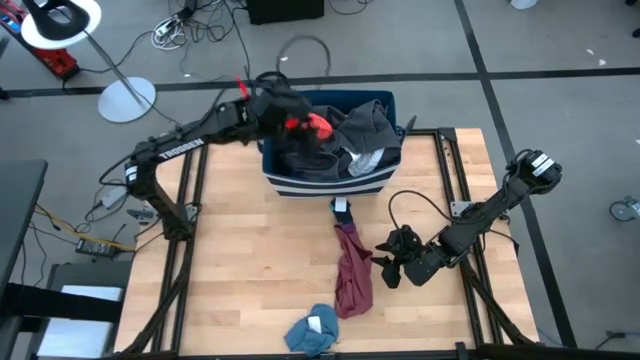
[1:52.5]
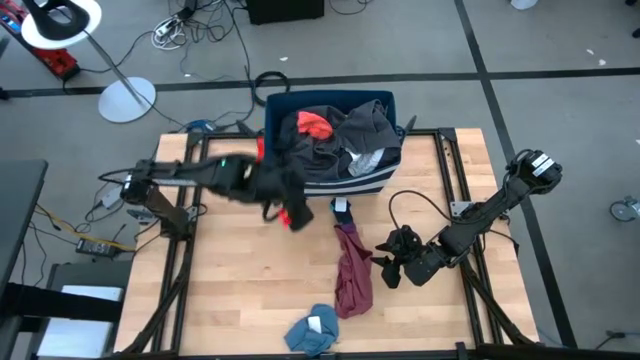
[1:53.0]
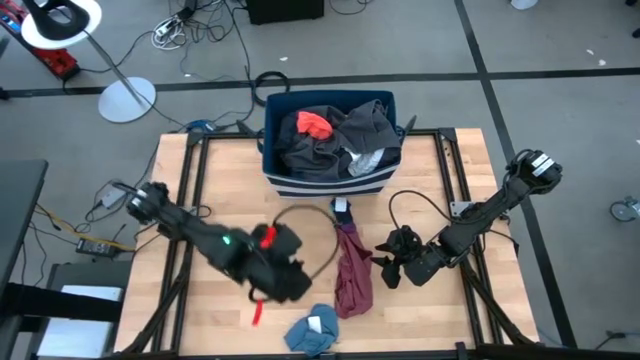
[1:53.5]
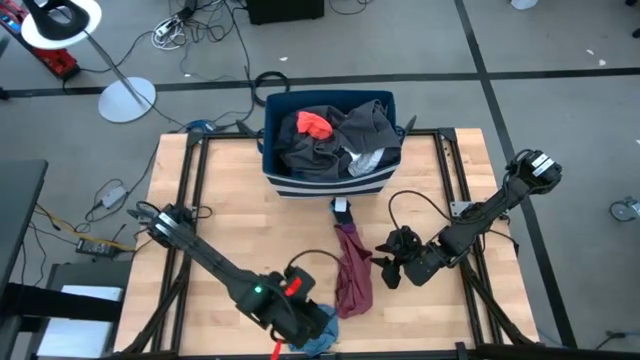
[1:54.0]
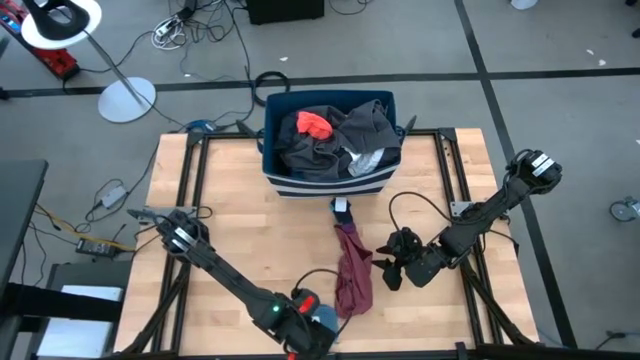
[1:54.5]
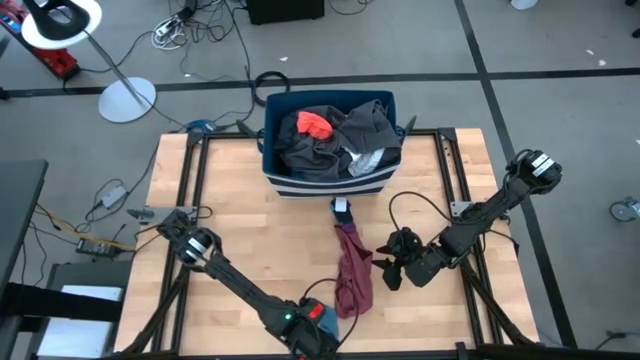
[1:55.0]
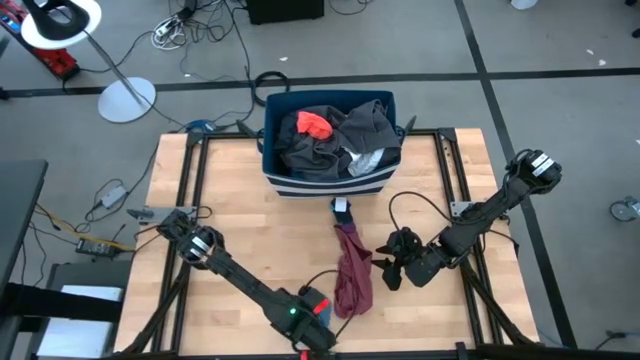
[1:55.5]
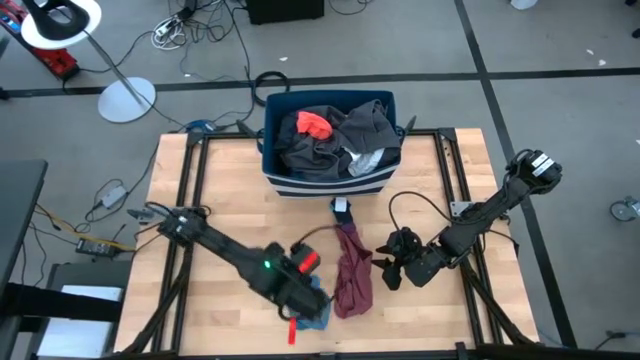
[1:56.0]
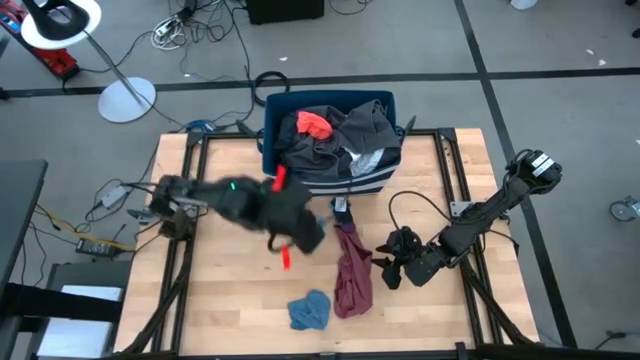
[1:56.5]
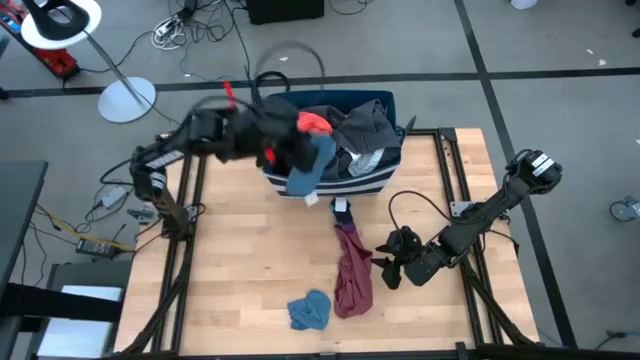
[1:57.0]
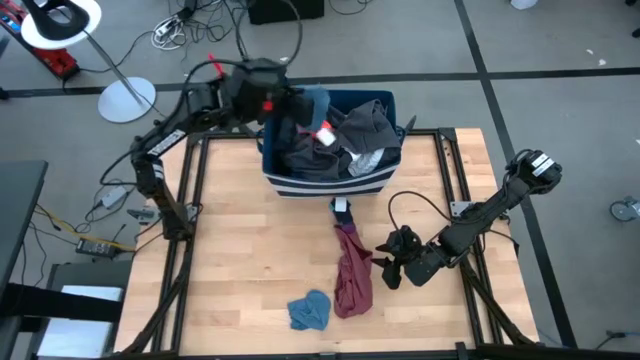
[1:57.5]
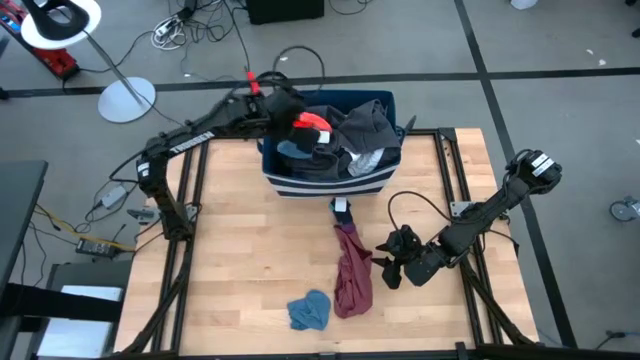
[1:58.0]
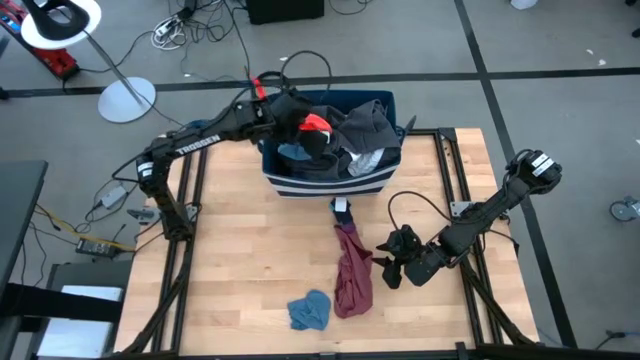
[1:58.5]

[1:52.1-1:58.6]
Task: Sort clothes
Put the blue microfiber cloth into the laundry bin

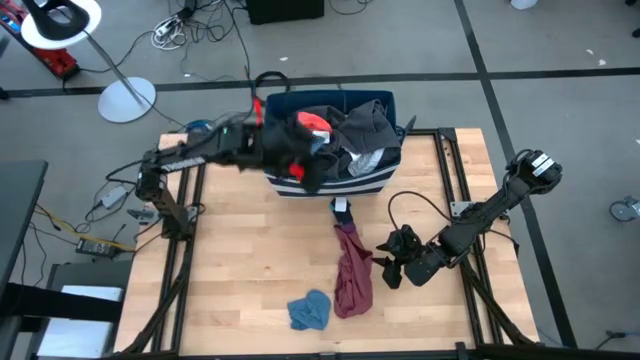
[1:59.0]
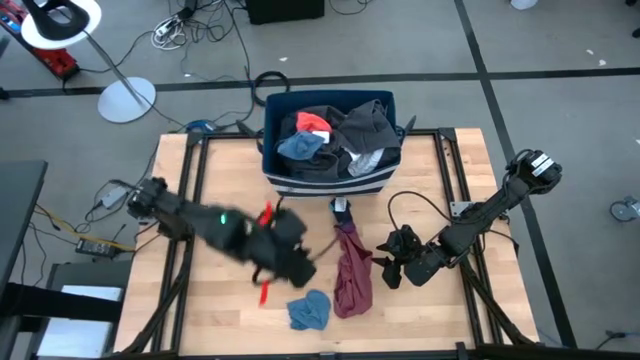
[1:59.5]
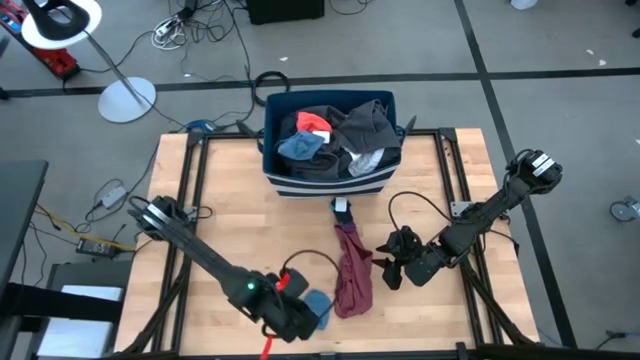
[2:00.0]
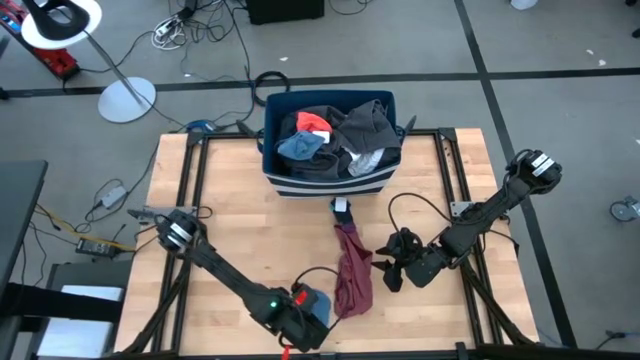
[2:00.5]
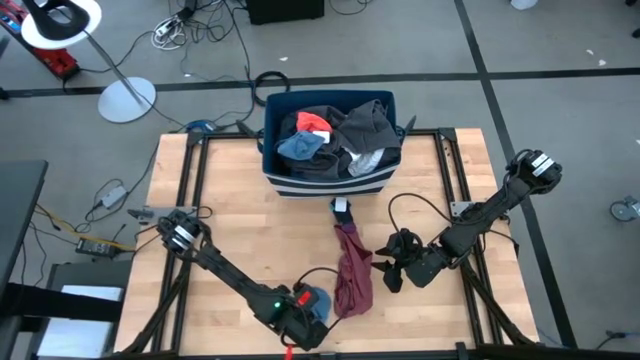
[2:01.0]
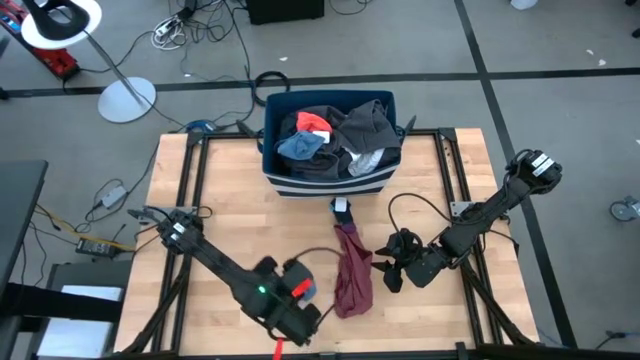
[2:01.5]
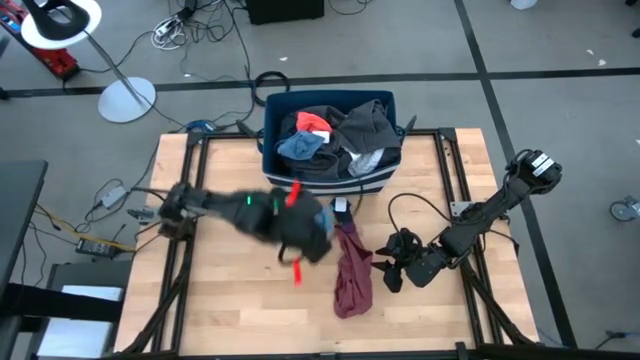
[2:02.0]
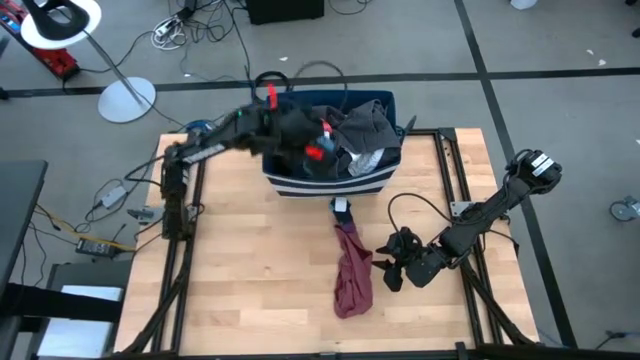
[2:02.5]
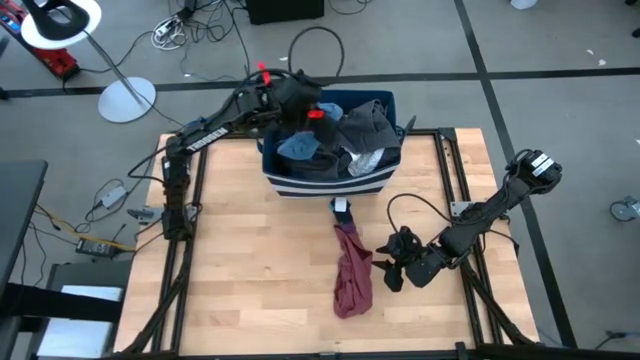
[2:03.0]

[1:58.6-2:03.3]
Put the blue towel into the laundry bin

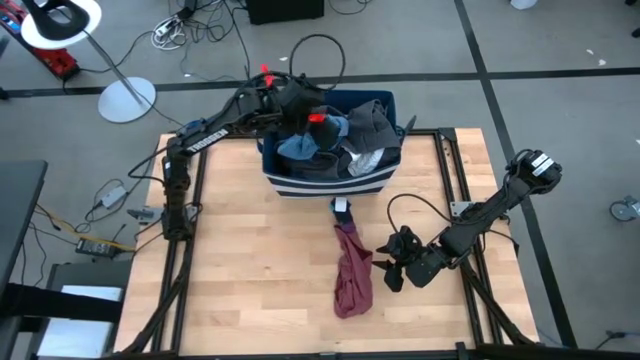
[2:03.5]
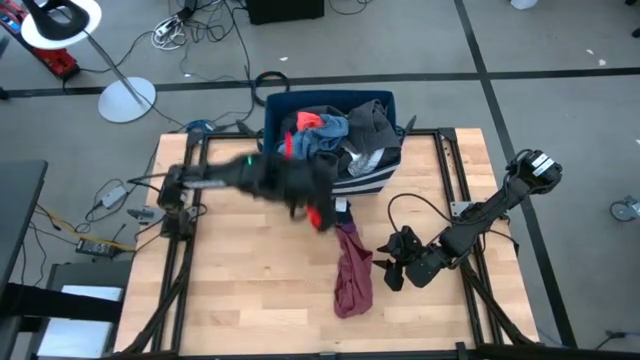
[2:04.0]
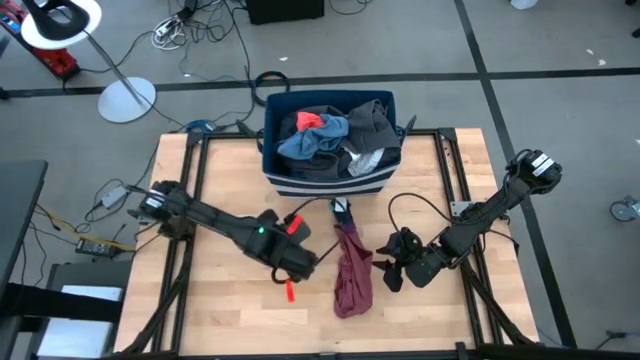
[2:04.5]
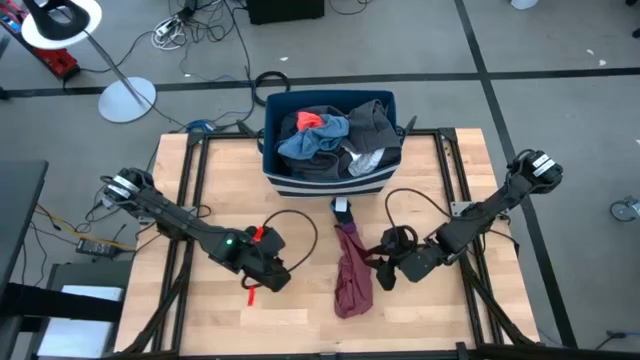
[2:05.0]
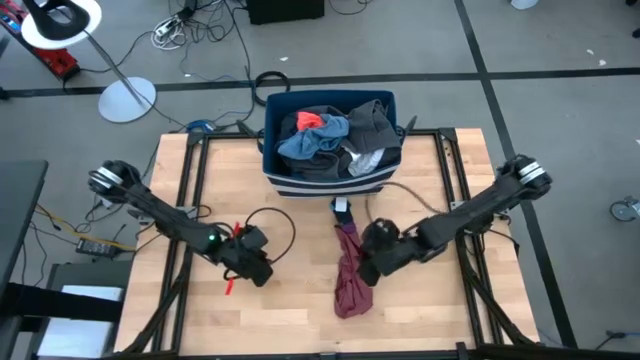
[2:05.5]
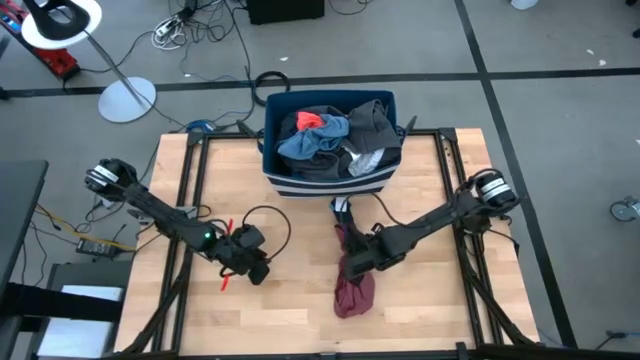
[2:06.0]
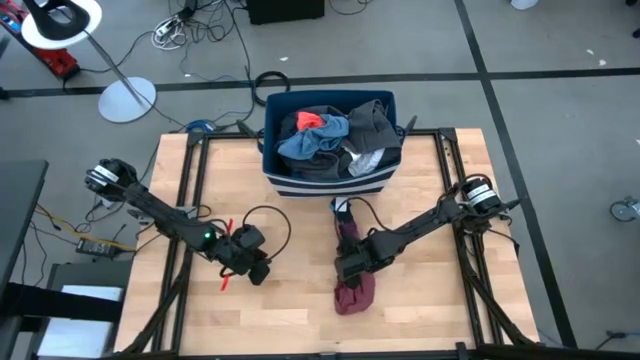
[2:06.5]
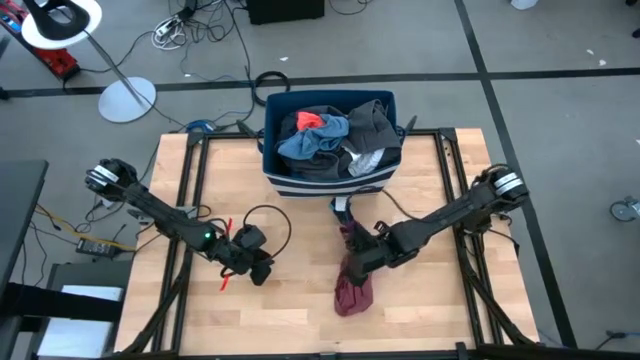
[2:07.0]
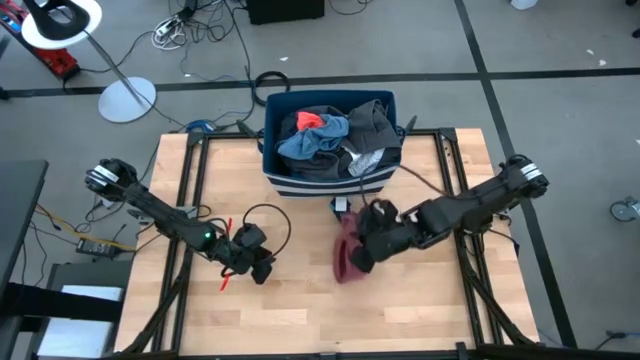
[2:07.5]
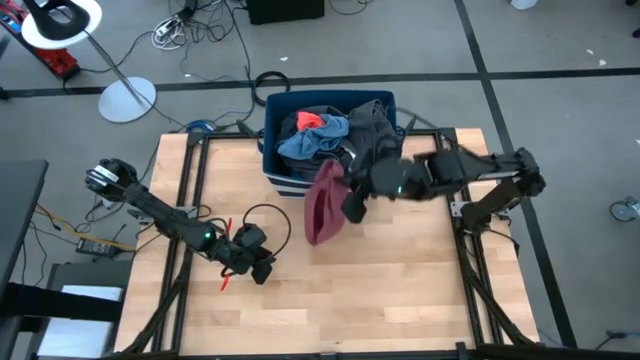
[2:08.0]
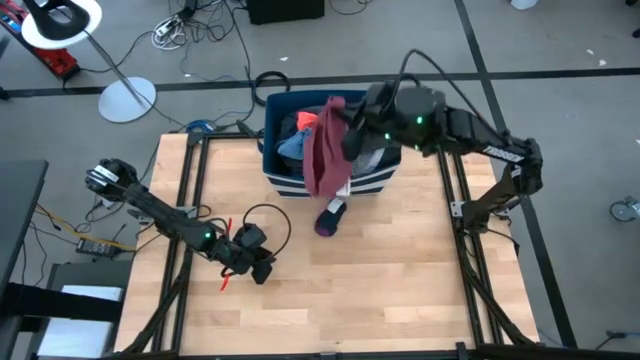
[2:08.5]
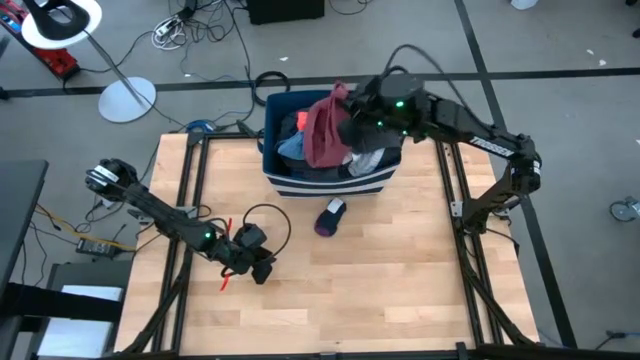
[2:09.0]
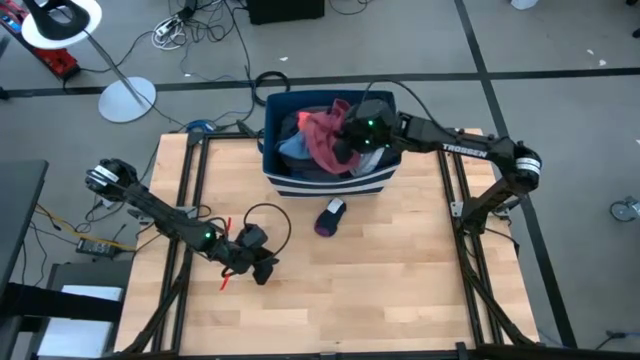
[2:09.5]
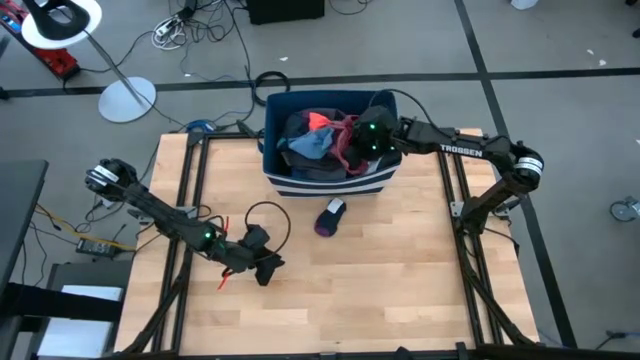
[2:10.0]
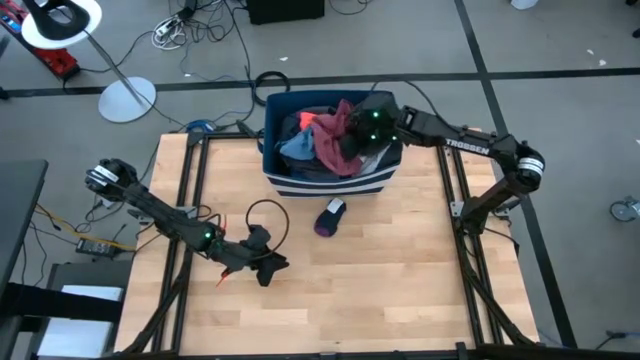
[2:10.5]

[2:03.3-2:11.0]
Put the pink short into the laundry bin

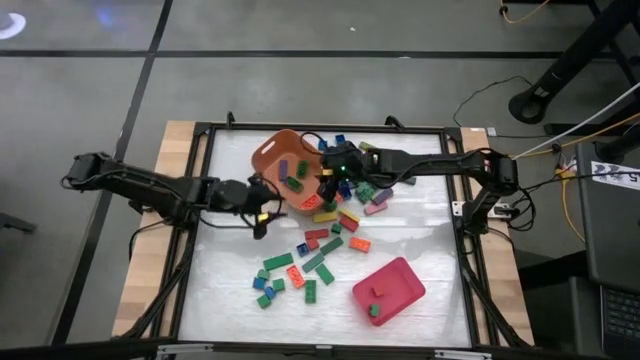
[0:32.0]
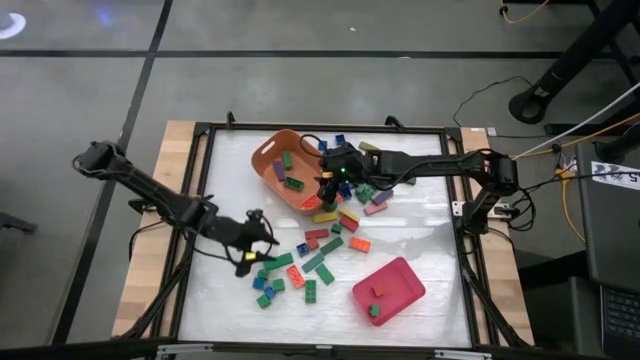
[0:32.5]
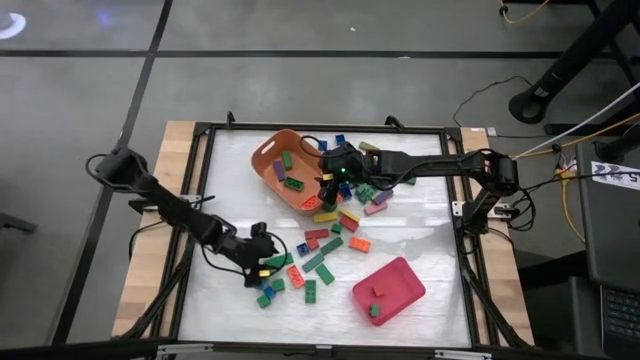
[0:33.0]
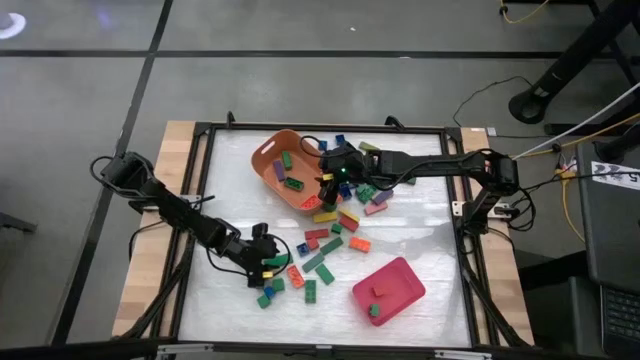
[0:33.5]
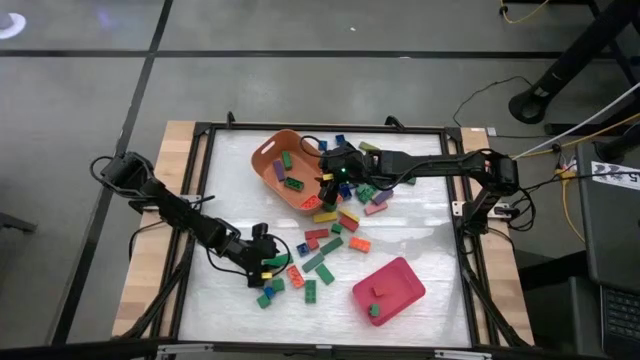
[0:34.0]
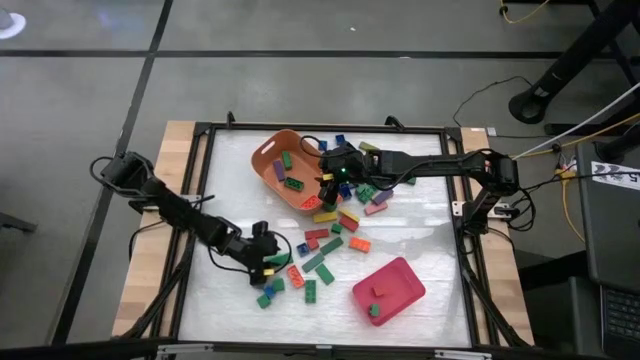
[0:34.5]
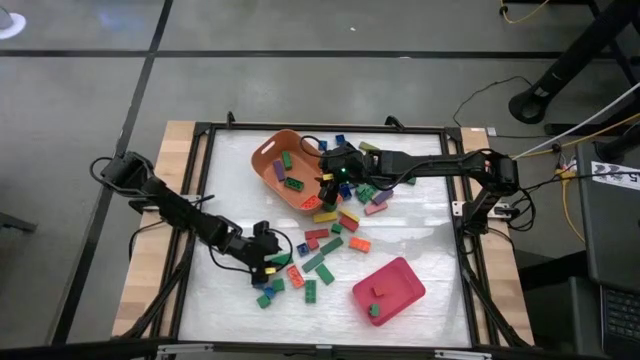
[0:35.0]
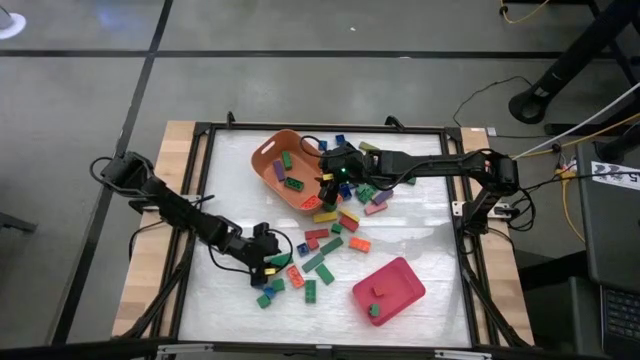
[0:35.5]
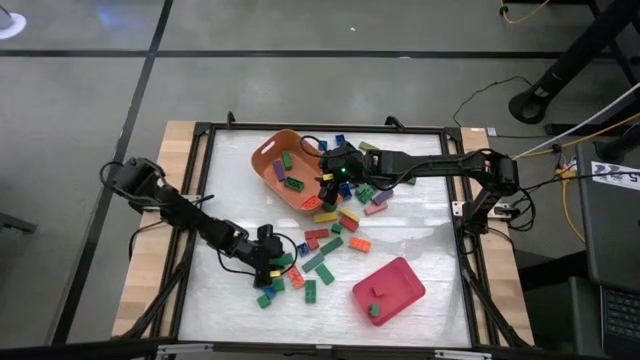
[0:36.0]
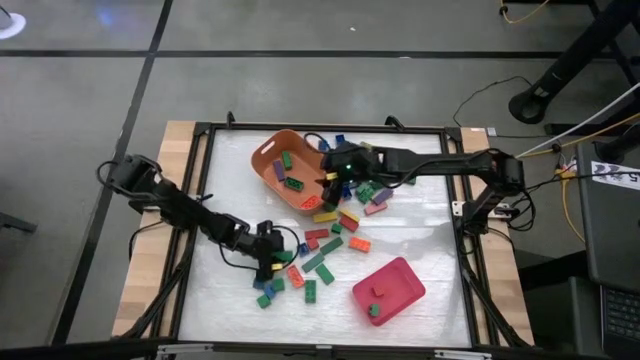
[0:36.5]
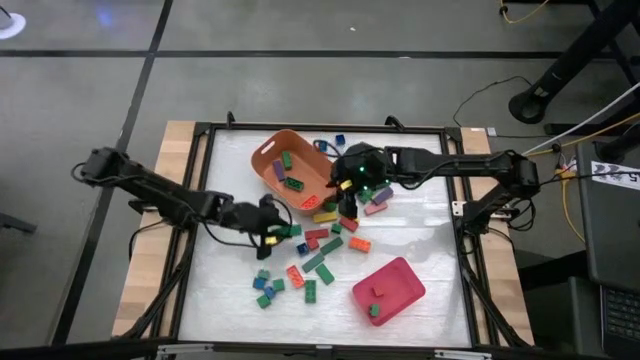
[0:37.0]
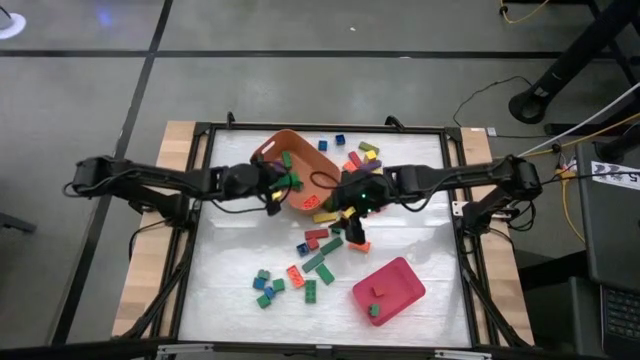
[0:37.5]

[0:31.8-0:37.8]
Task: Sort blocks by size
Put the large green block into the orange bin
